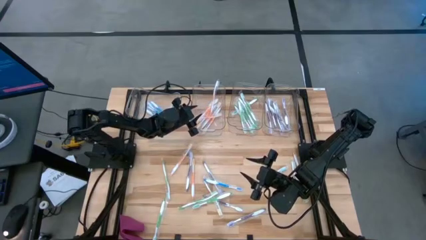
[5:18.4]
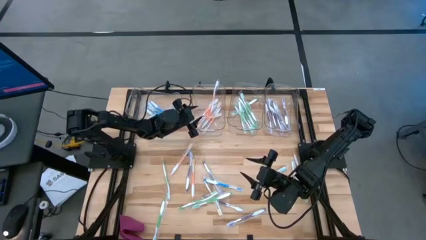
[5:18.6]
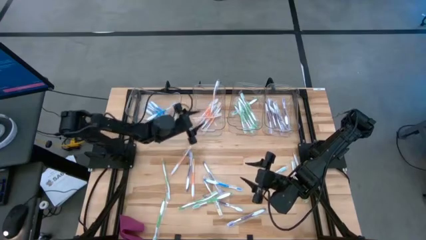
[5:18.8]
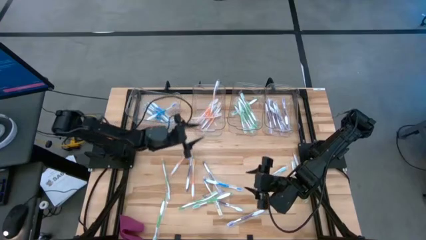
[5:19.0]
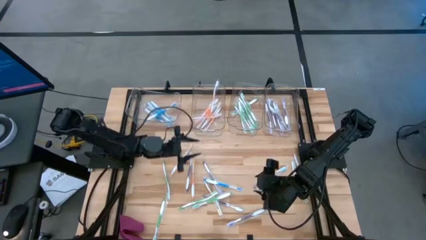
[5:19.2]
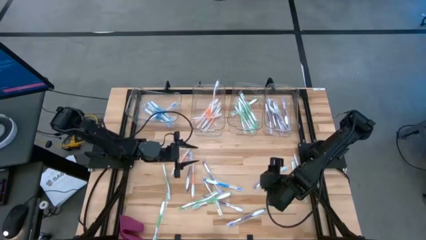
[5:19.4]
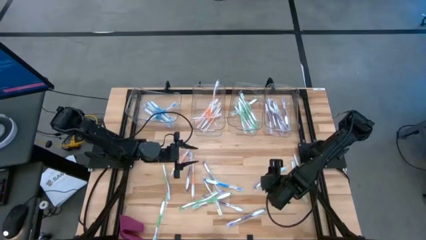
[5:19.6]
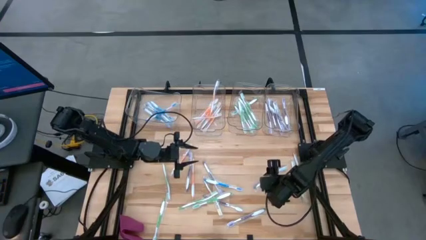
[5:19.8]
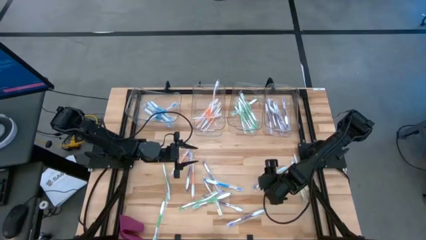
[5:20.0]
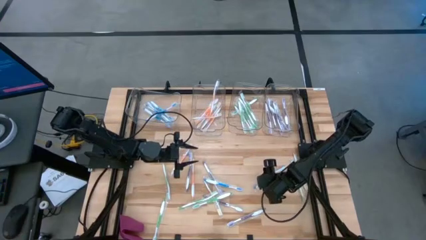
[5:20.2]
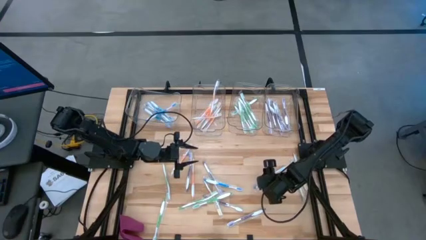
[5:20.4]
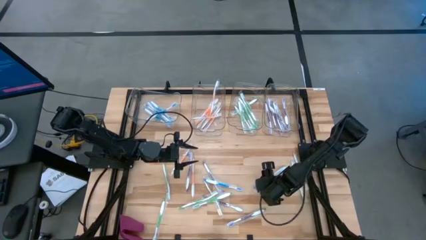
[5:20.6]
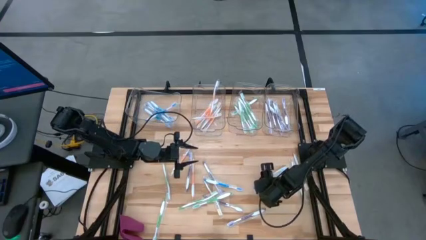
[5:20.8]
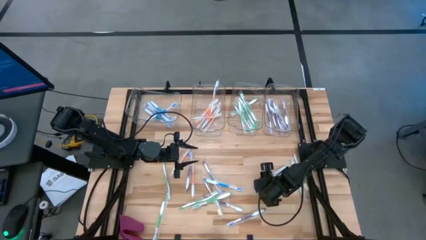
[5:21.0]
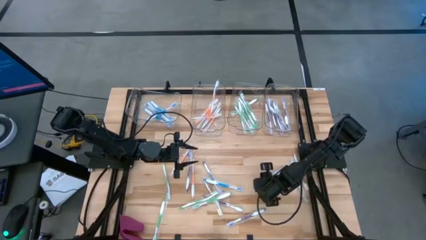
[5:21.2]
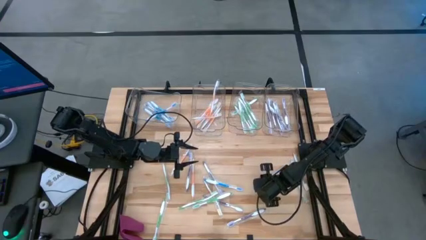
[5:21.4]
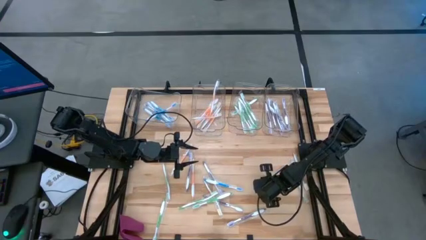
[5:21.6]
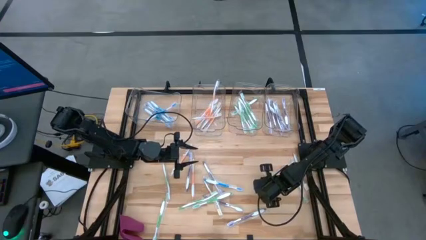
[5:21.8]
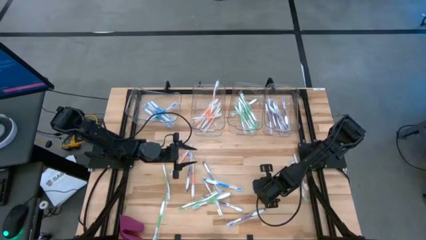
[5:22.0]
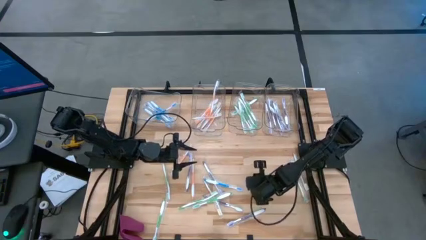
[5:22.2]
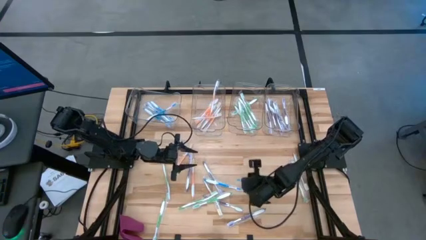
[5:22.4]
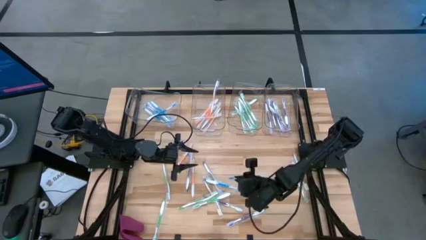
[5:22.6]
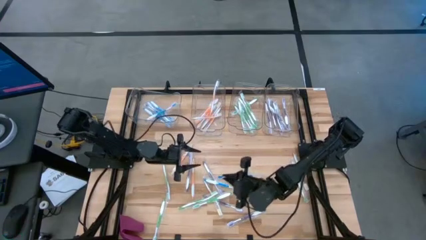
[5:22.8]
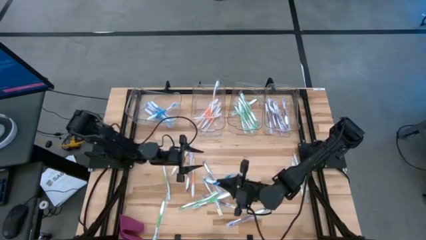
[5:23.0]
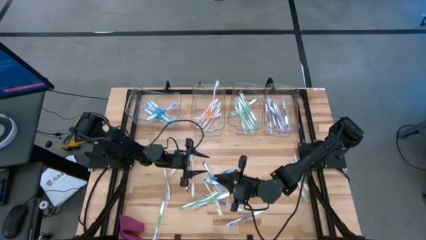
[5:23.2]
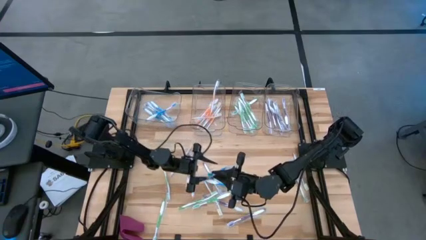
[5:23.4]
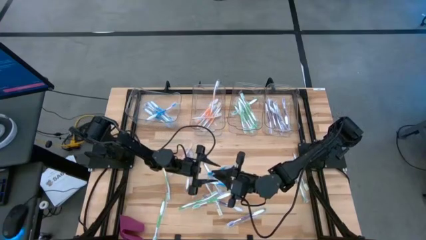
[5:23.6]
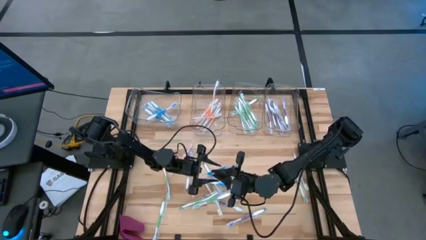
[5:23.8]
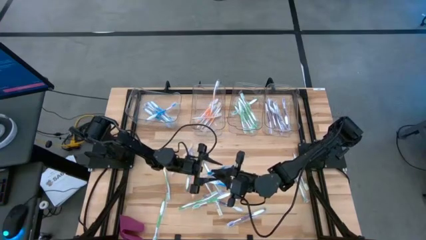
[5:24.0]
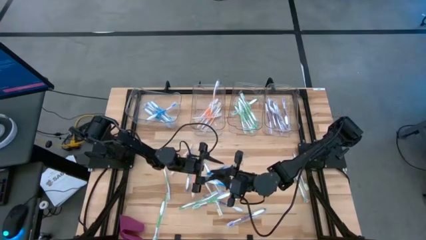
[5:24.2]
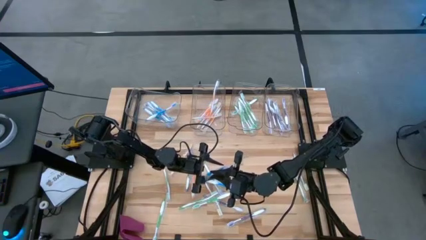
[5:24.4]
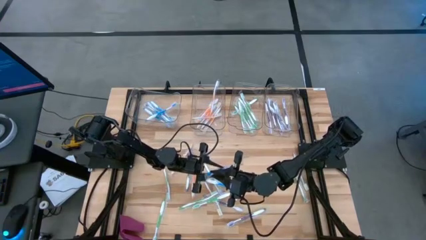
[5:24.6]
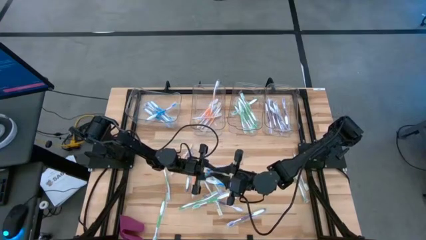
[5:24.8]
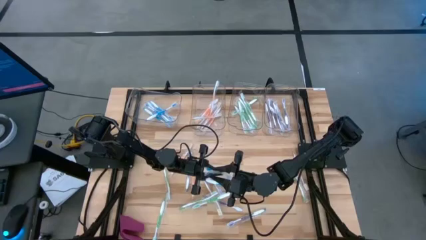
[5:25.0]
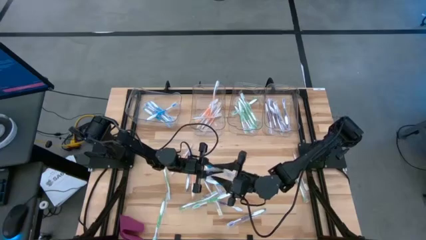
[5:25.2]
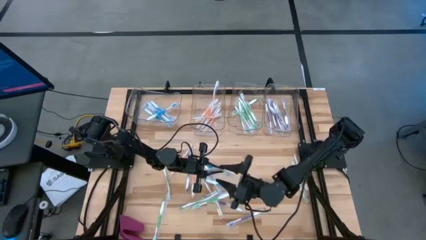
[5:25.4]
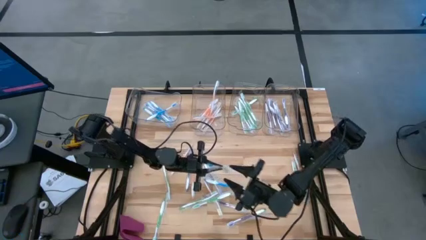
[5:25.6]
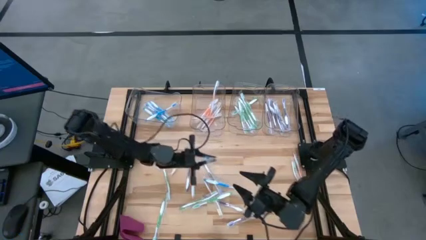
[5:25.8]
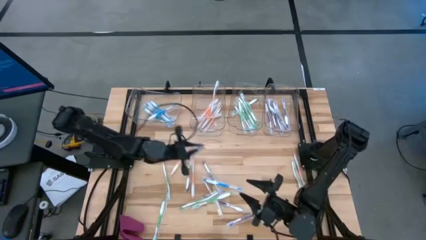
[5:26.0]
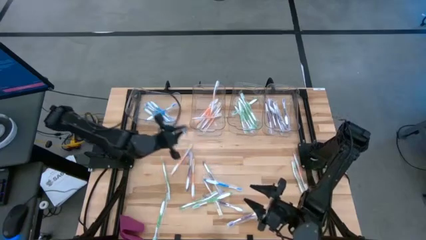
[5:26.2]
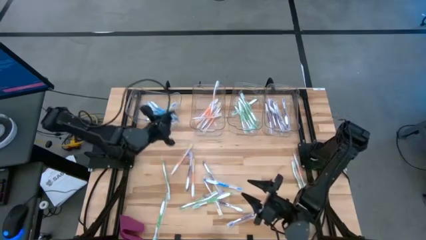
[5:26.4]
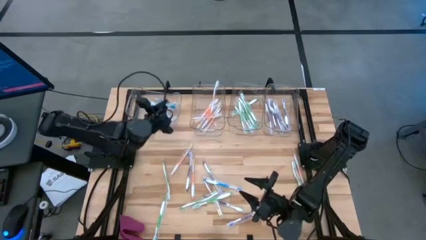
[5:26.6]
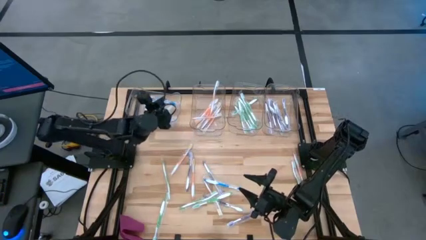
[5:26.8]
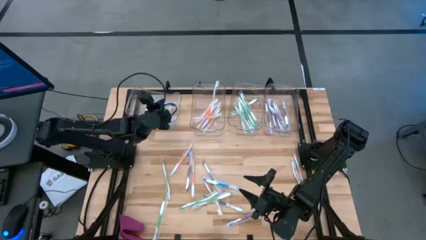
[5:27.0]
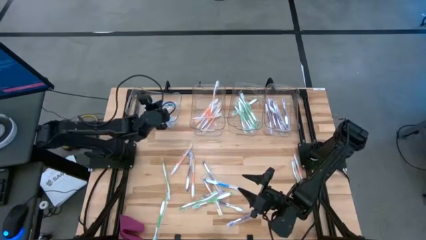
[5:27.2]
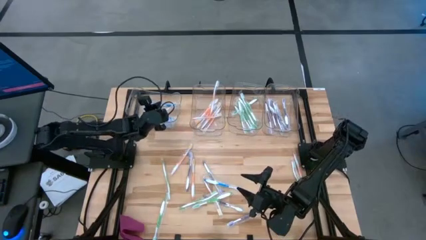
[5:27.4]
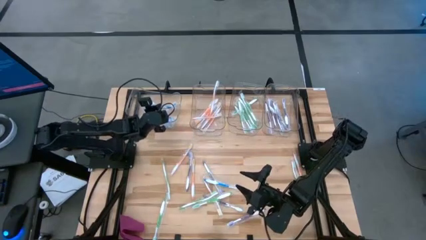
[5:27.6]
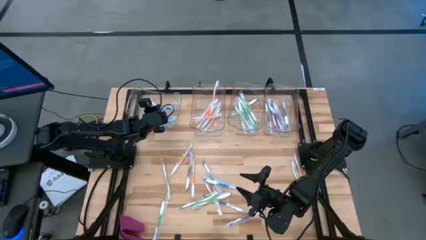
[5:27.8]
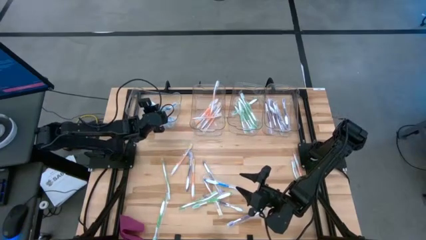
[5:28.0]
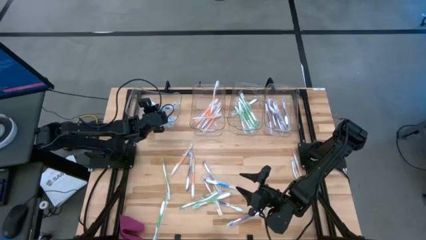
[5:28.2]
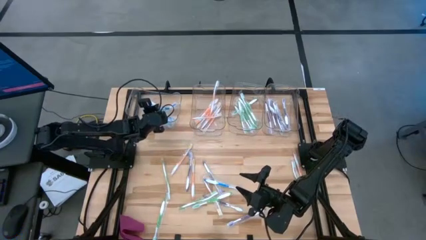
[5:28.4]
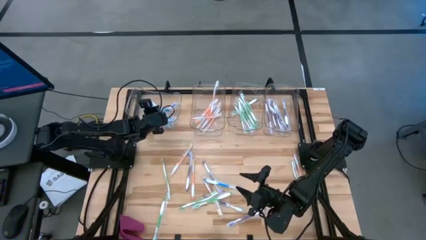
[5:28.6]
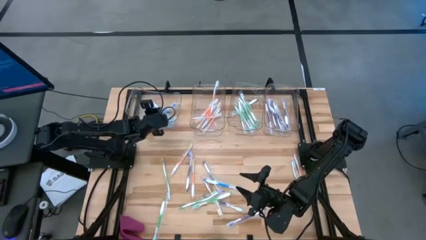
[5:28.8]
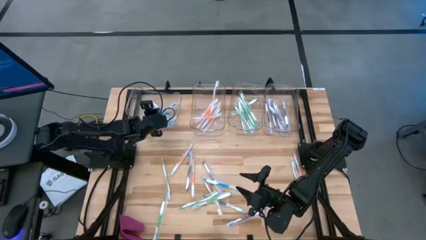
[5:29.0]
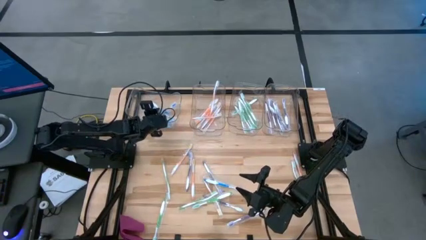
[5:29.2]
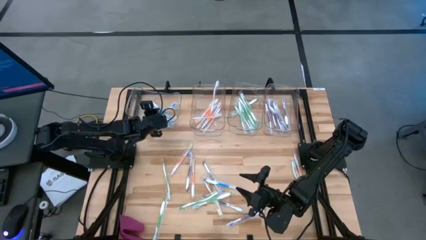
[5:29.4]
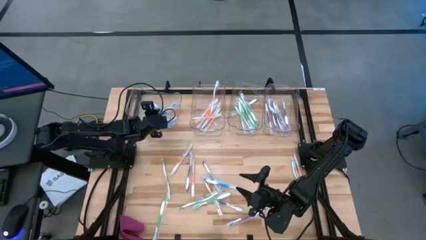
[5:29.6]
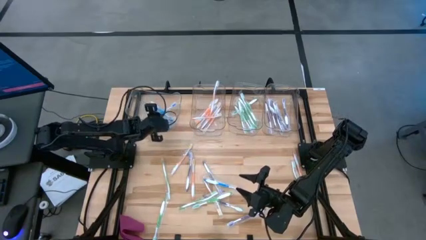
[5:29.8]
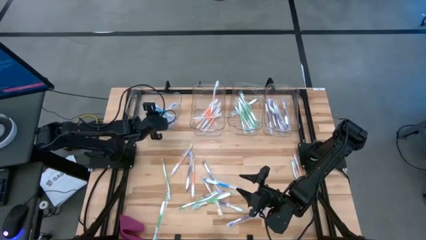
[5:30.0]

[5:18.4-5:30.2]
Task: Pick & Place Toothbrushes
Put the blue toothbrush into the left transparent bin

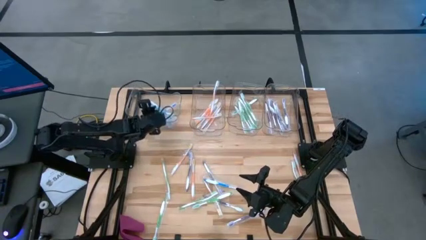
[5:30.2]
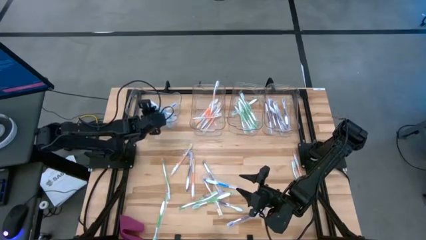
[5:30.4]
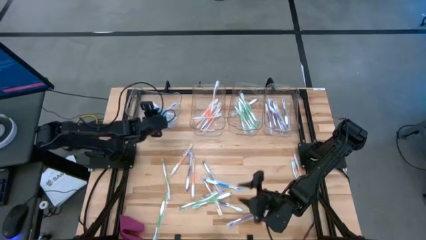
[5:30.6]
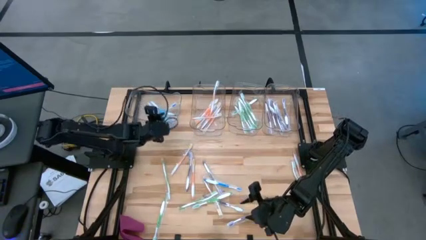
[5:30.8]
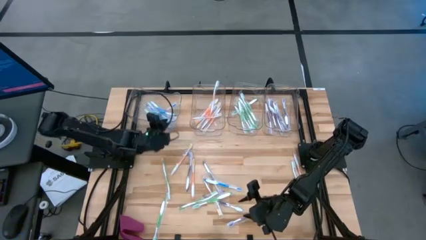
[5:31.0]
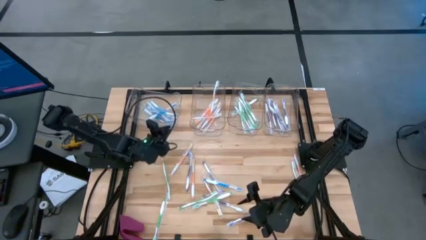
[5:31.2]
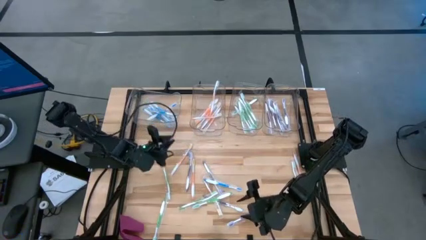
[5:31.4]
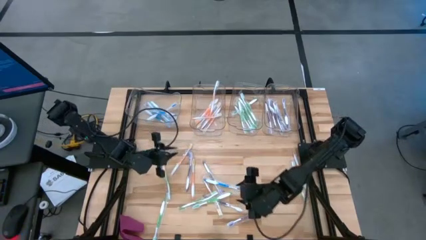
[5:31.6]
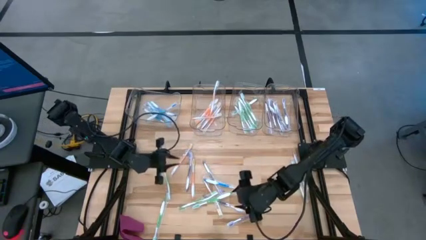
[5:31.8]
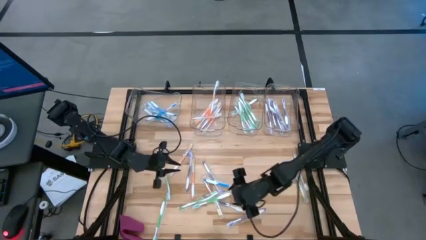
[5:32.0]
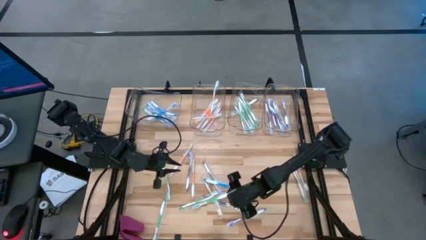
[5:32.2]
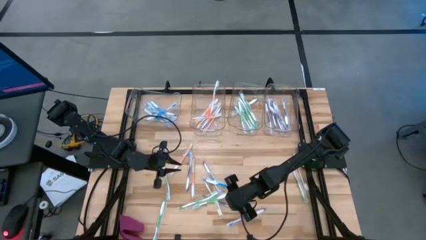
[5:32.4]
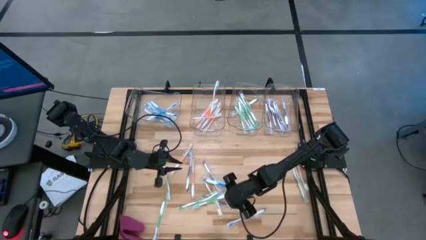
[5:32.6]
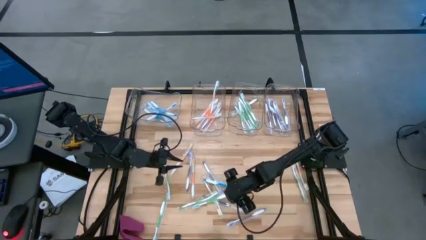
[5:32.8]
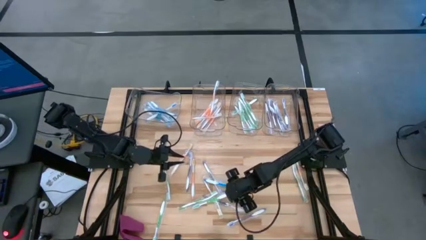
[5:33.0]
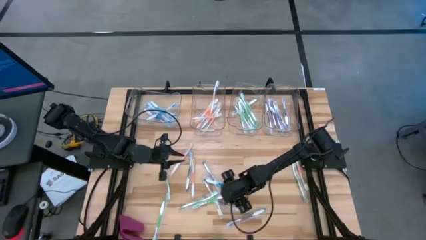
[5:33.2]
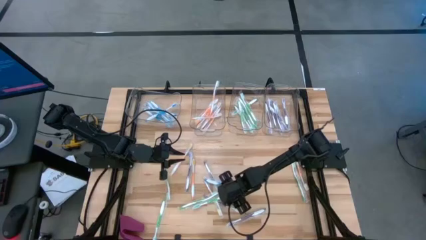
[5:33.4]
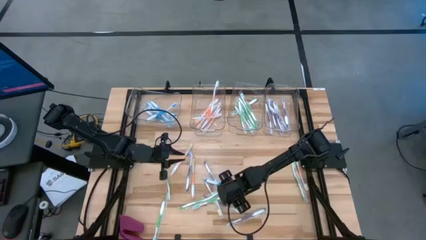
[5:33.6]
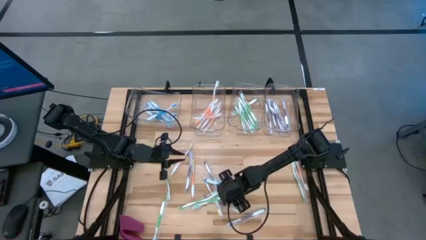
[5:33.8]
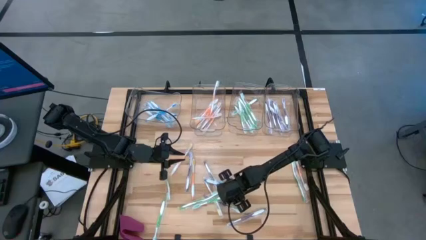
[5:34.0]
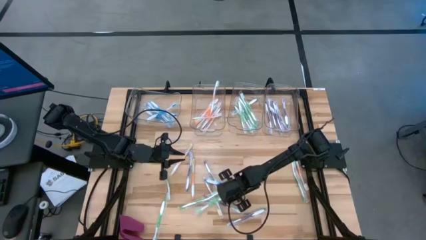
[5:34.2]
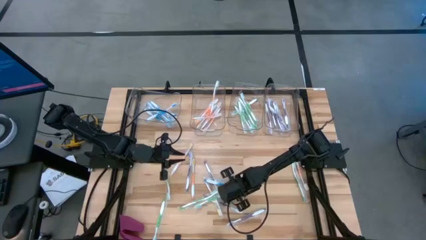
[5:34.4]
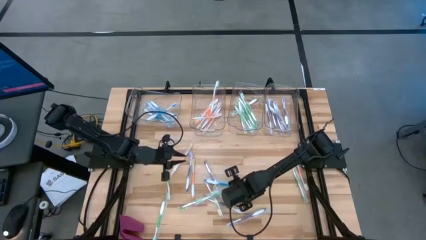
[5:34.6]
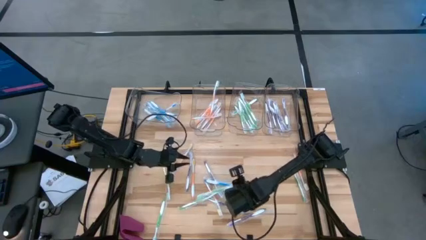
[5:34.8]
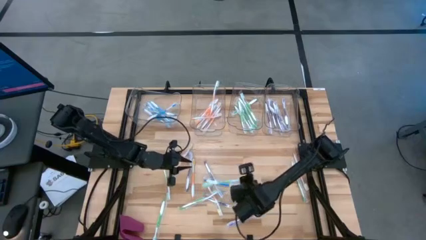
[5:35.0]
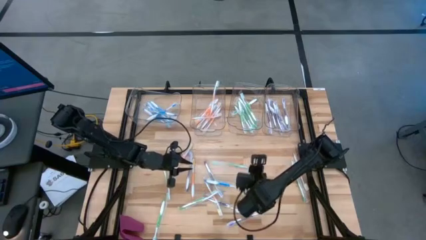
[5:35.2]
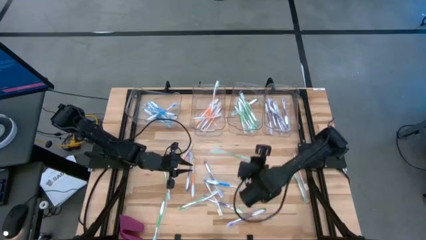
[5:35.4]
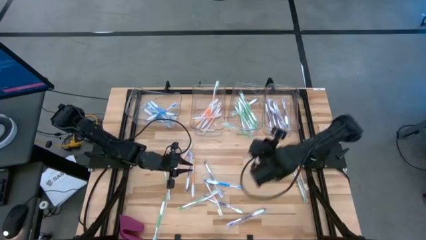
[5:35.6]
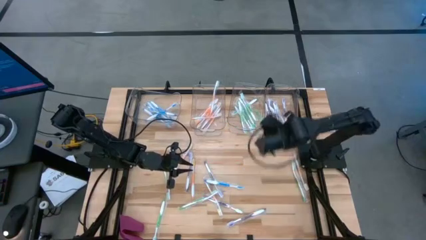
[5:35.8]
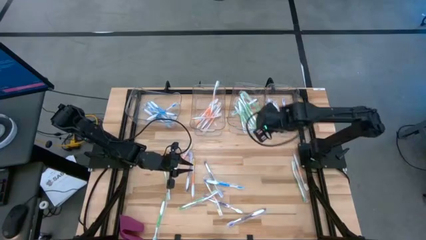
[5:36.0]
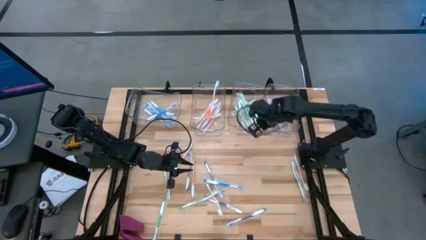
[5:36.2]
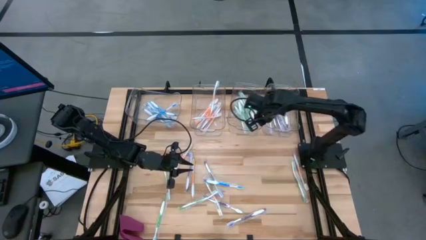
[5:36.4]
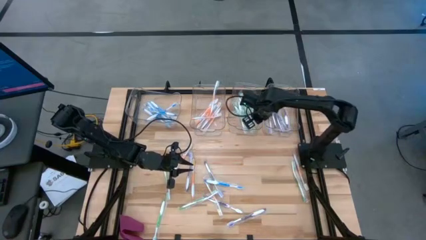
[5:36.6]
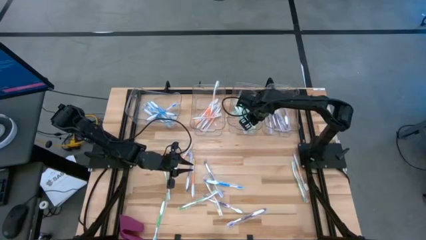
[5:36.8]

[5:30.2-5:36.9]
Put the green toothbrush into the middle right transparent bin
